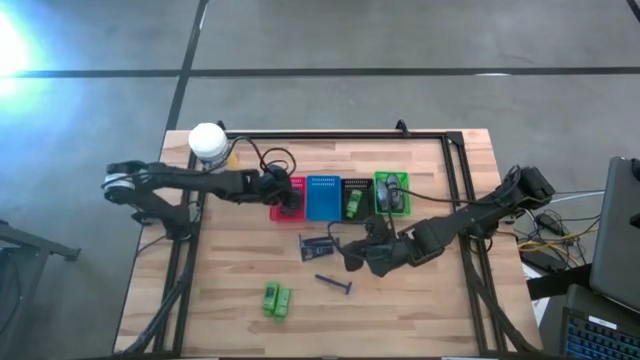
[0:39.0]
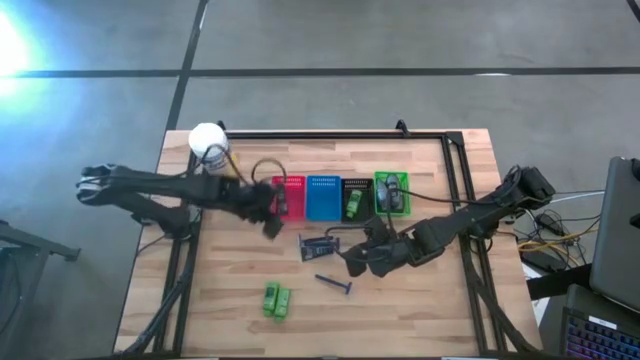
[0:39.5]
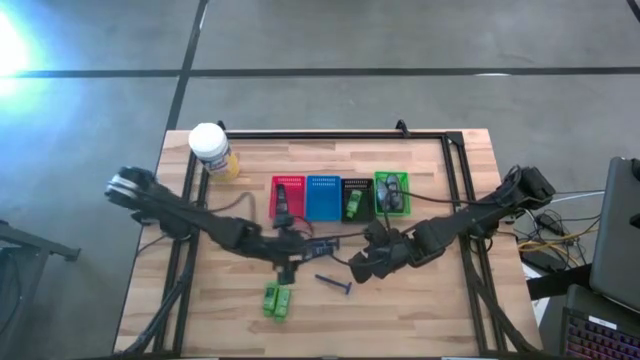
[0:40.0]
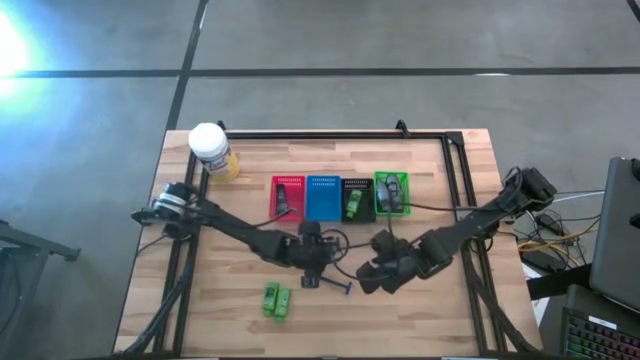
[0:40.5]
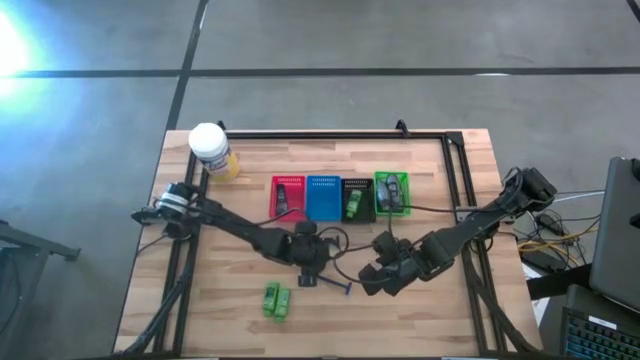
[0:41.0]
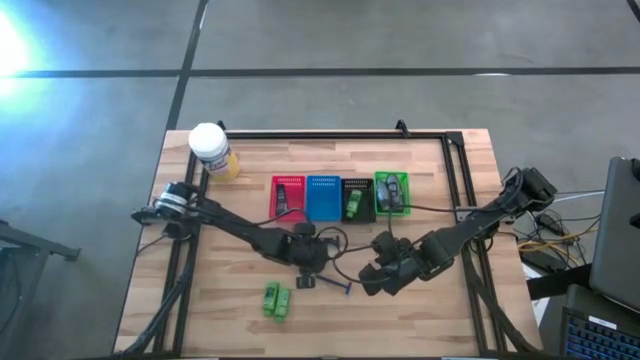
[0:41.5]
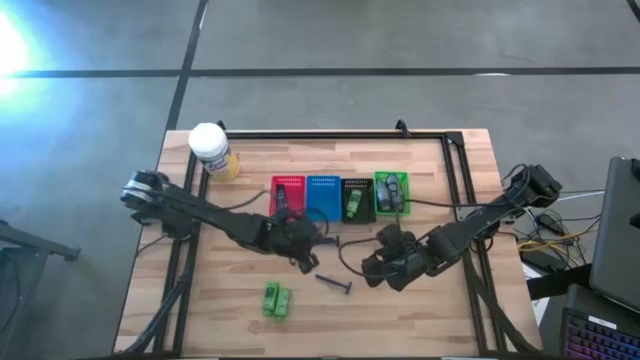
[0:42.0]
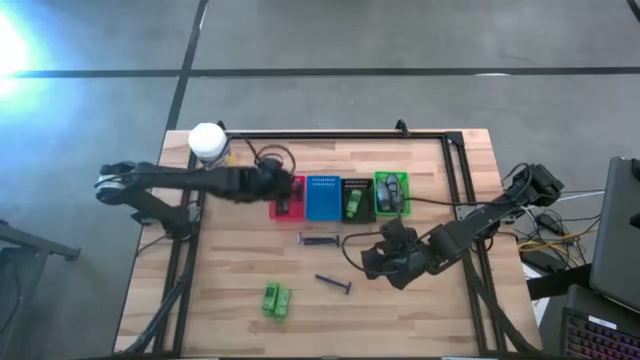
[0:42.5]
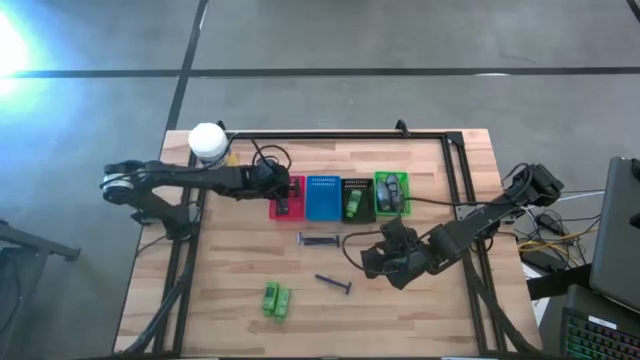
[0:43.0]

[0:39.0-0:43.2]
Task: Pick & Place Travel size toiletries
Put the shave cream into the red basket

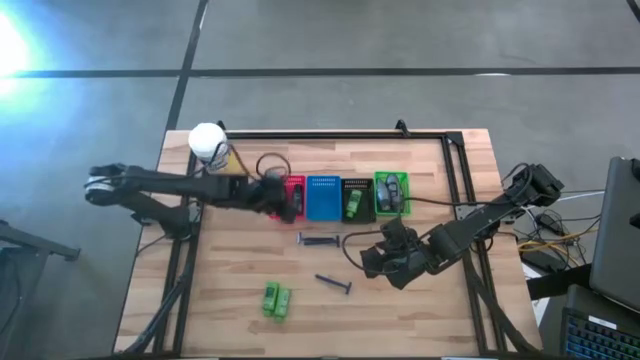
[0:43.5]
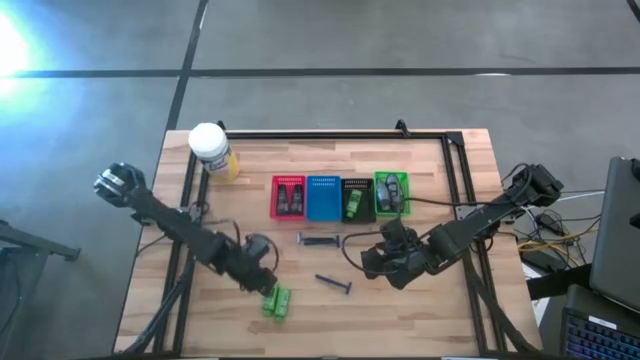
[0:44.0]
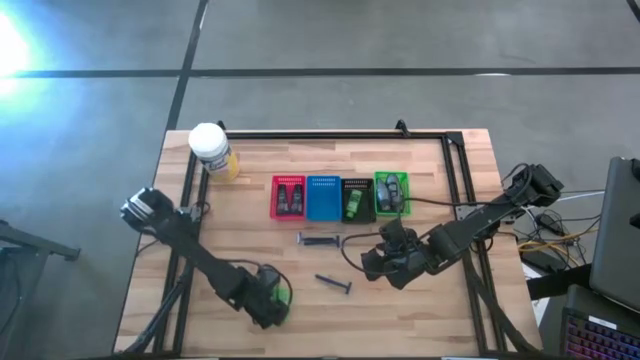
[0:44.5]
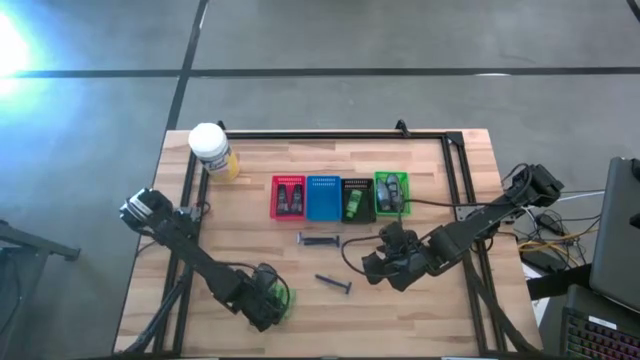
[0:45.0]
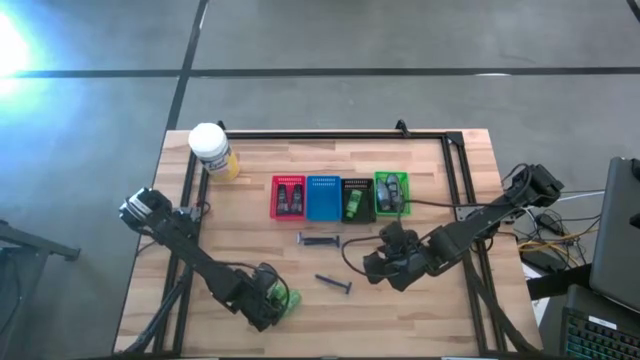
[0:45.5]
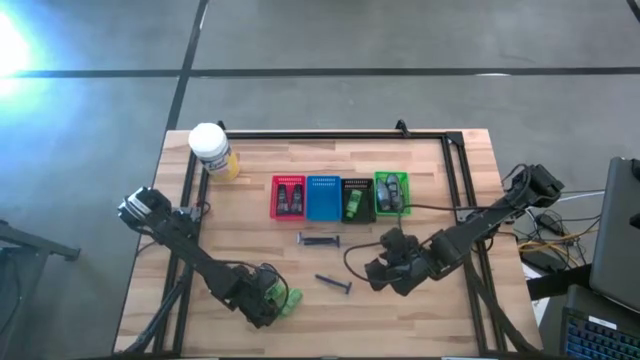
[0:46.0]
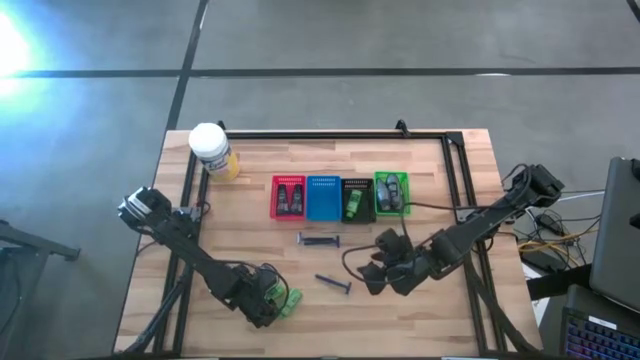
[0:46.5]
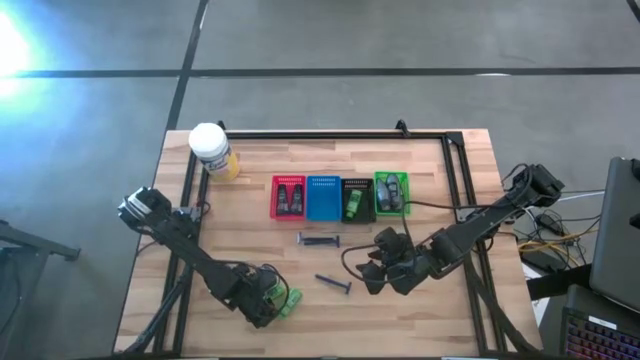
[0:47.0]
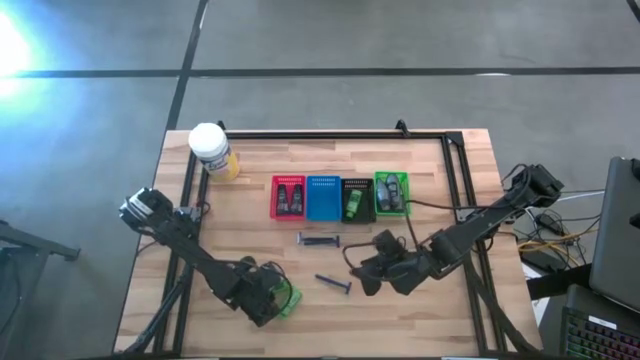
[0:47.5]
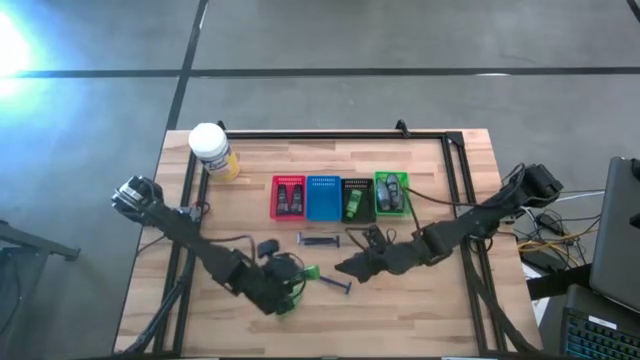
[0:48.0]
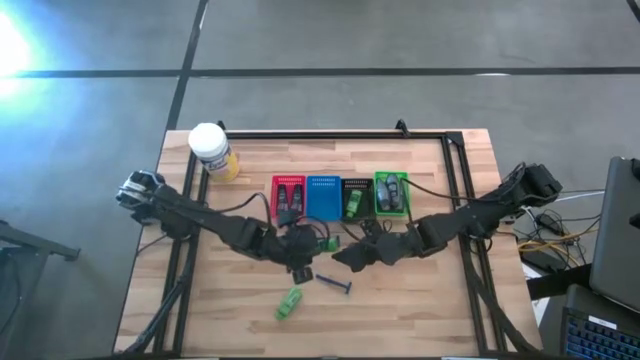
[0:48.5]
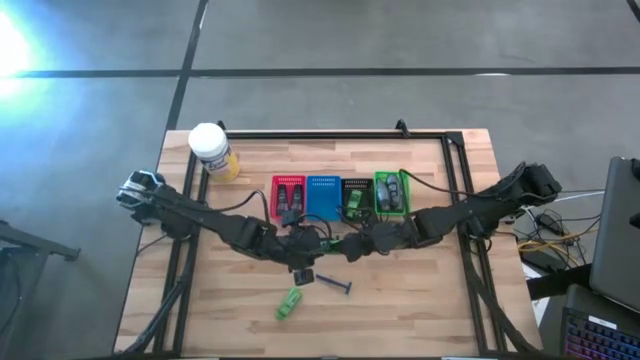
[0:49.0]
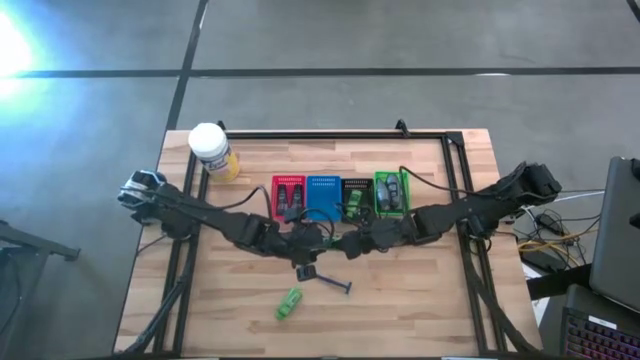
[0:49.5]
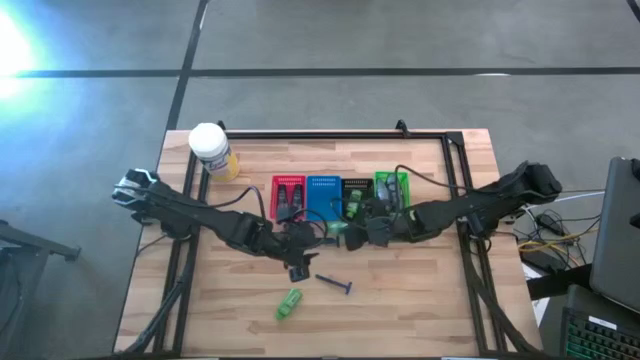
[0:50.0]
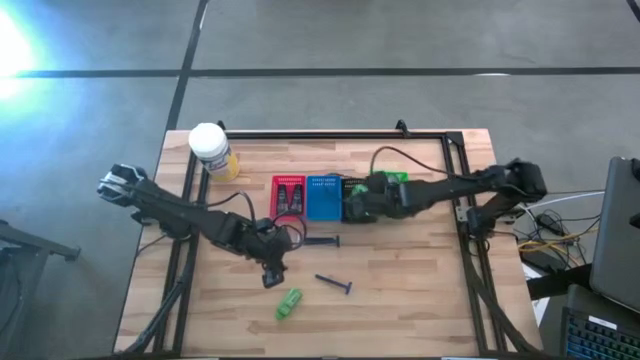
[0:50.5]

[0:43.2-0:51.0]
Put the shampoo into the black basket

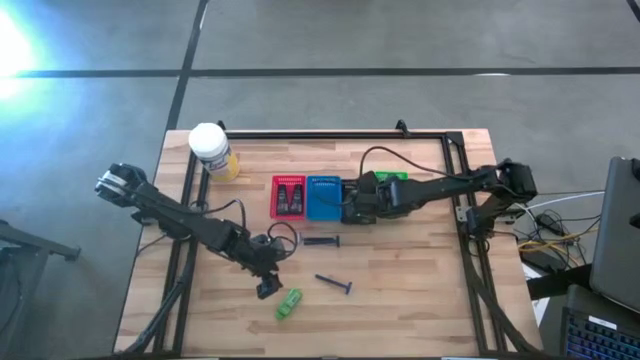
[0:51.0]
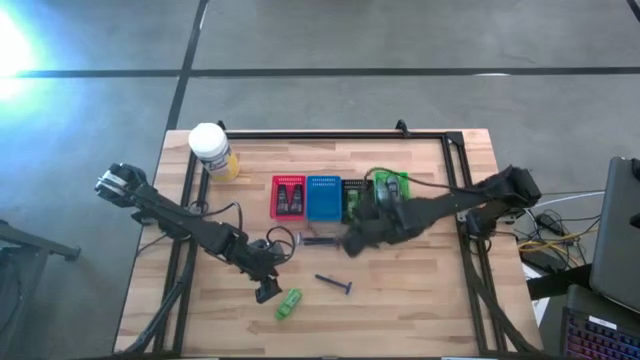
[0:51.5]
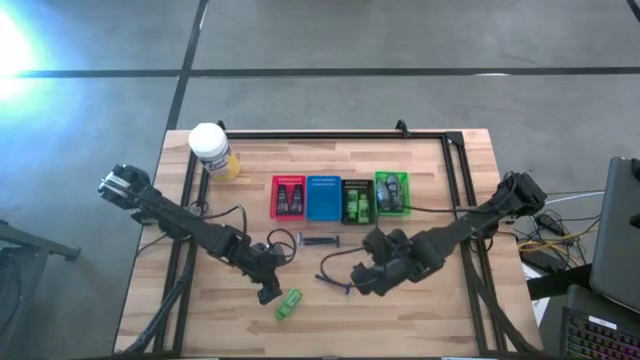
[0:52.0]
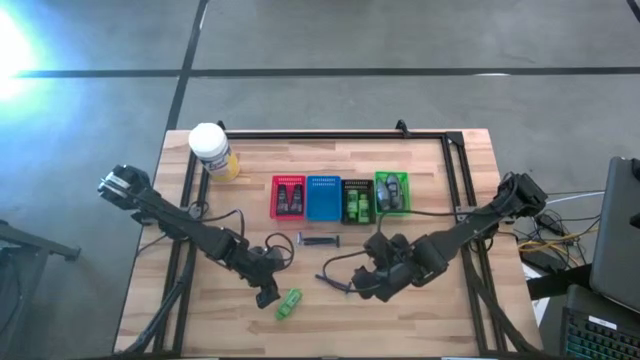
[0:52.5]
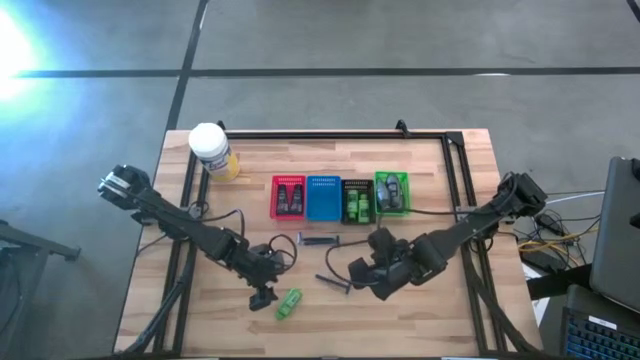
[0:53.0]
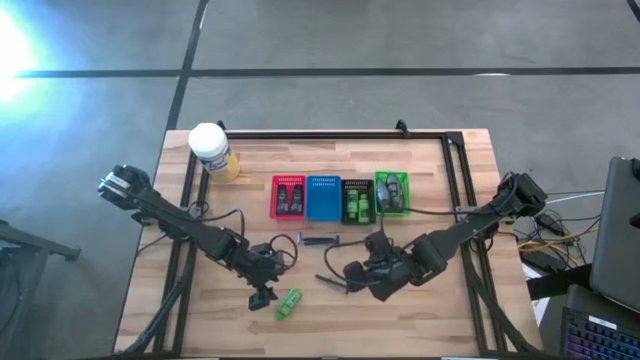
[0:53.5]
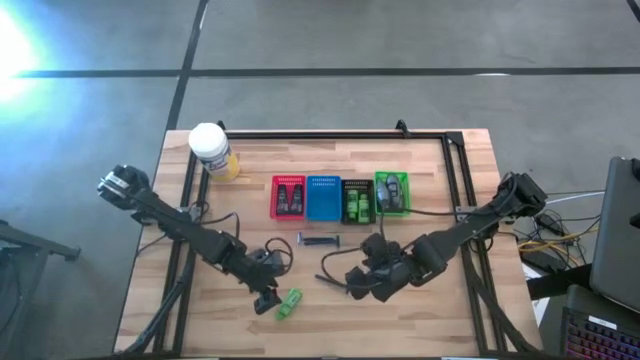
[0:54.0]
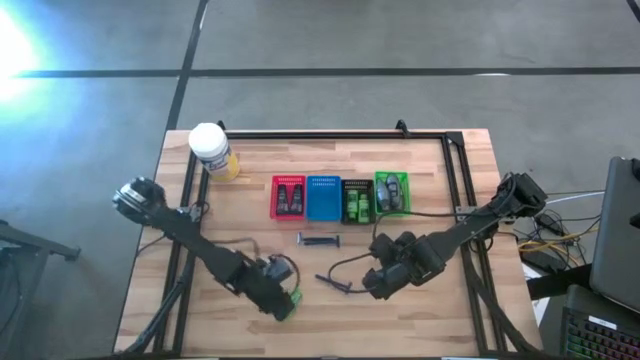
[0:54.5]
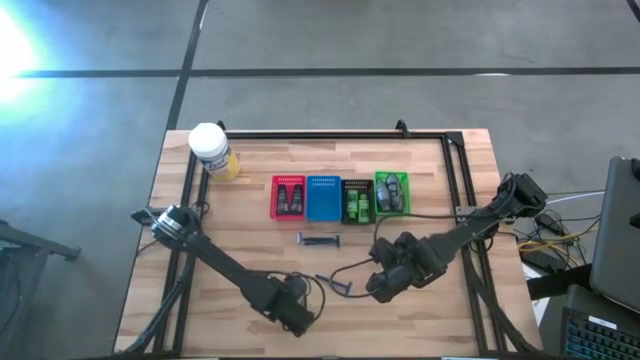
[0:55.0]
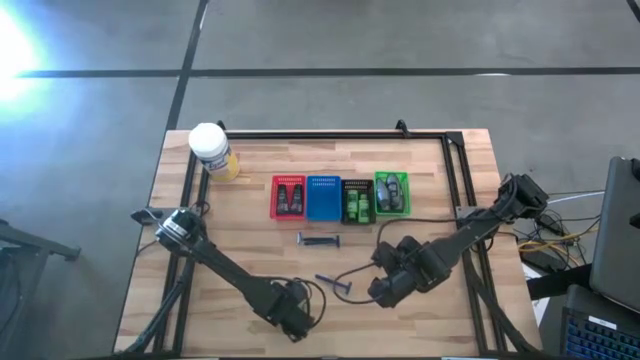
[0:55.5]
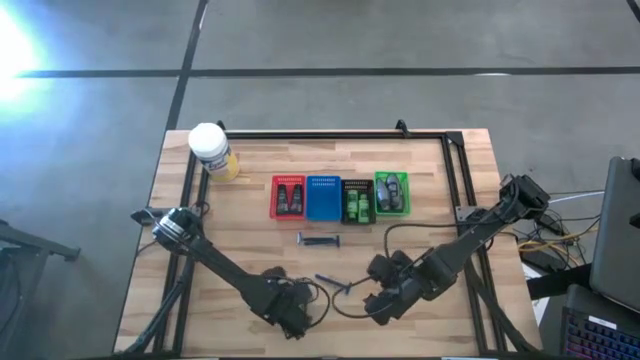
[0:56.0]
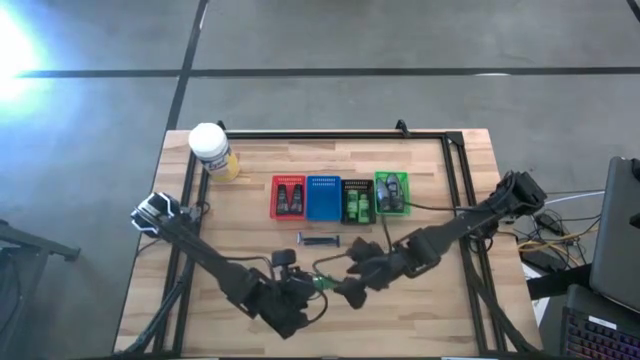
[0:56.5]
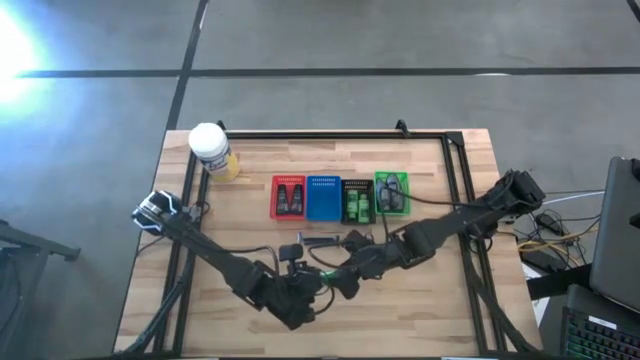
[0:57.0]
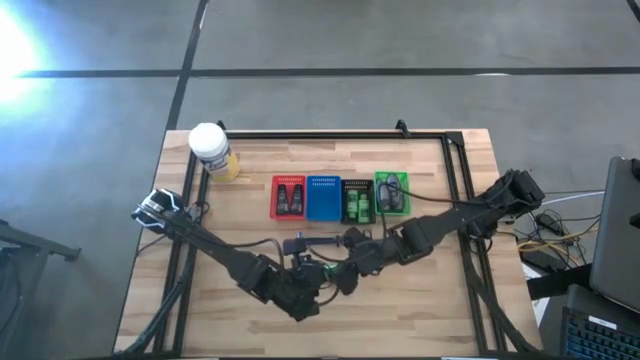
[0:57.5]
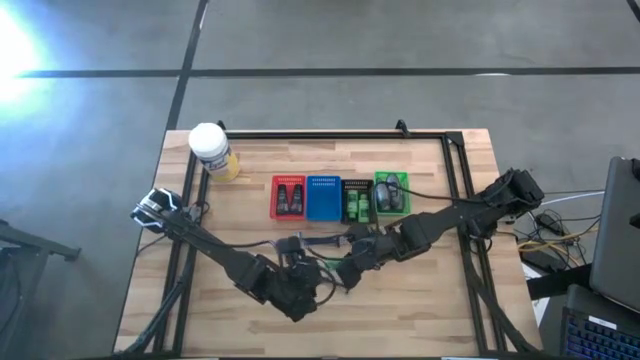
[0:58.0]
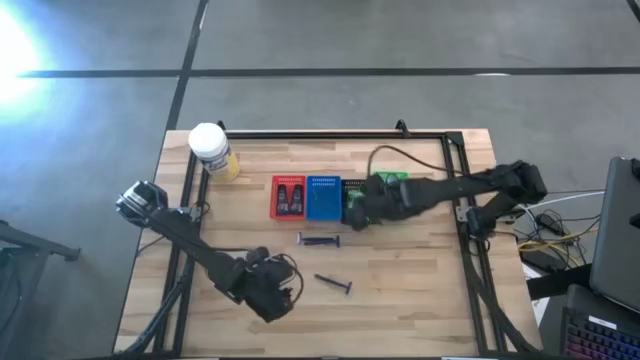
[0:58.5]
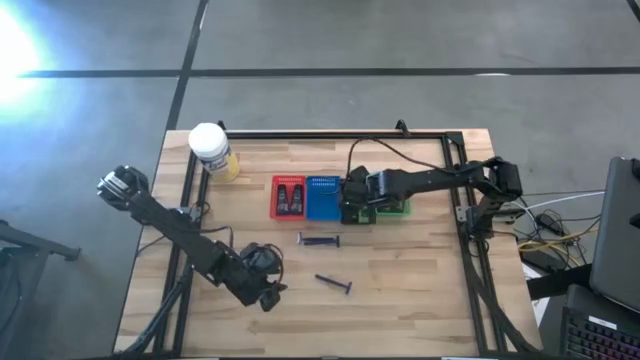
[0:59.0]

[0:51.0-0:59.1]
Put the shampoo into the black basket
